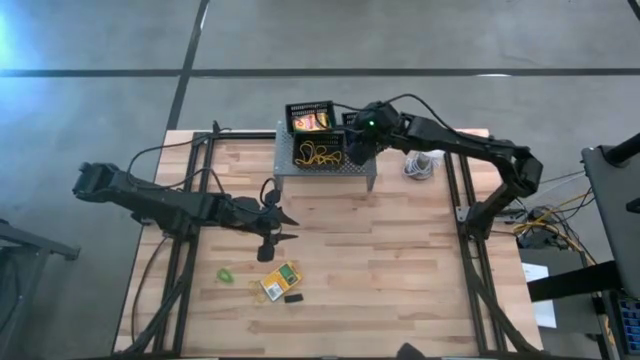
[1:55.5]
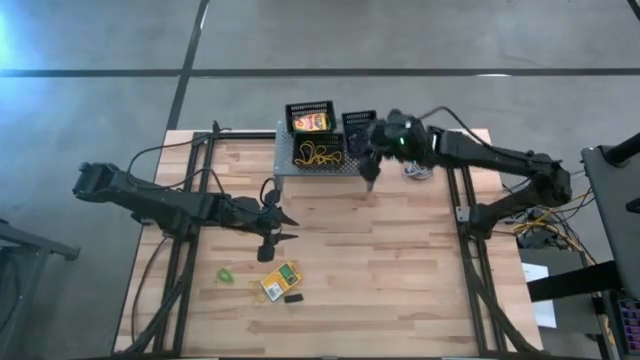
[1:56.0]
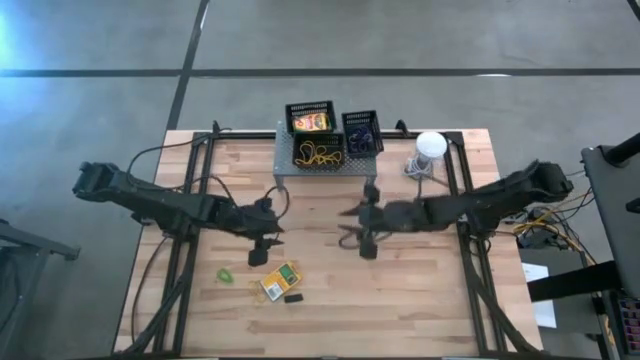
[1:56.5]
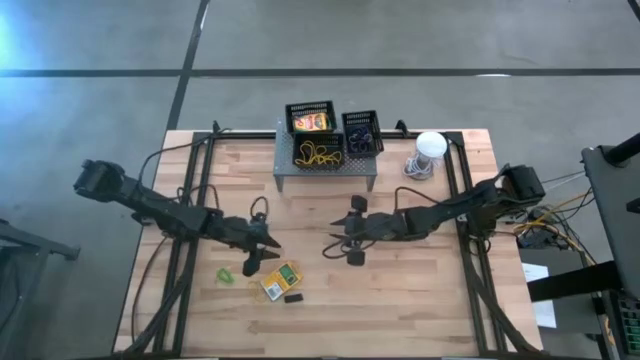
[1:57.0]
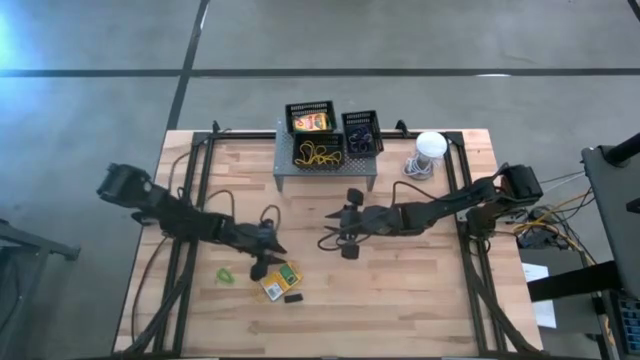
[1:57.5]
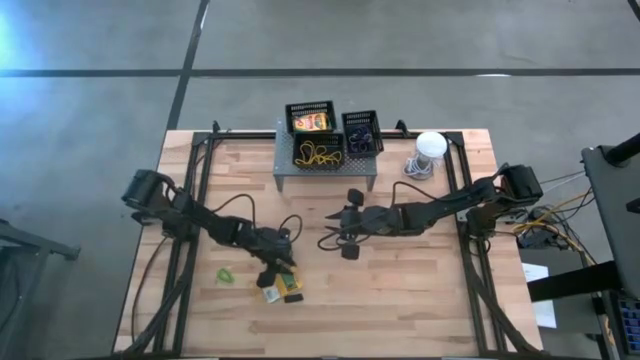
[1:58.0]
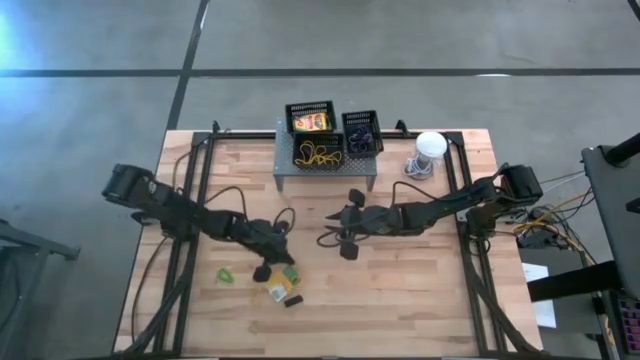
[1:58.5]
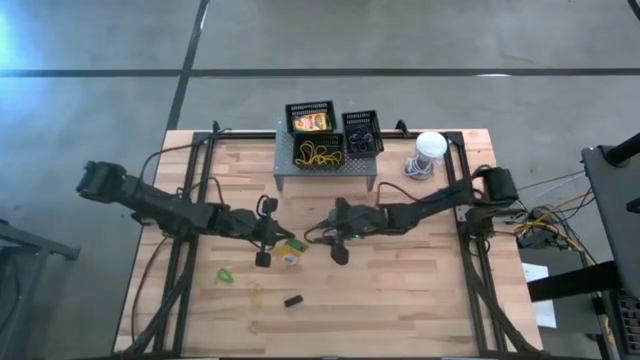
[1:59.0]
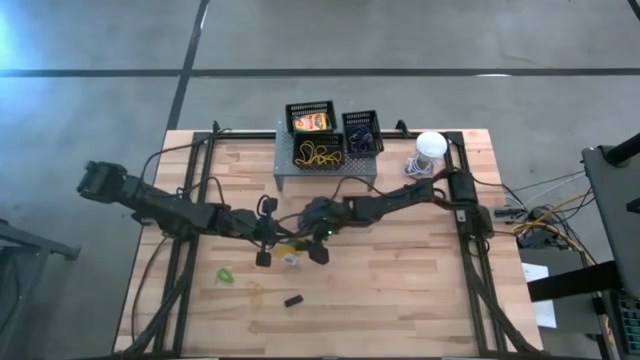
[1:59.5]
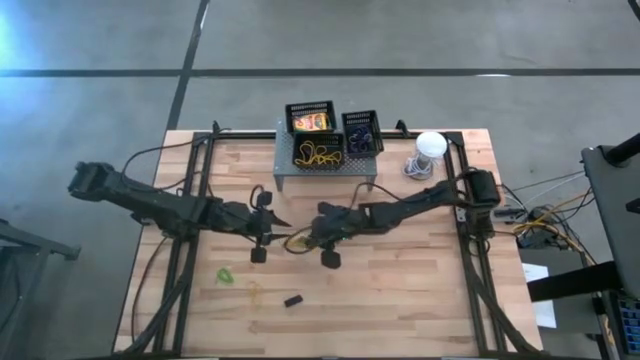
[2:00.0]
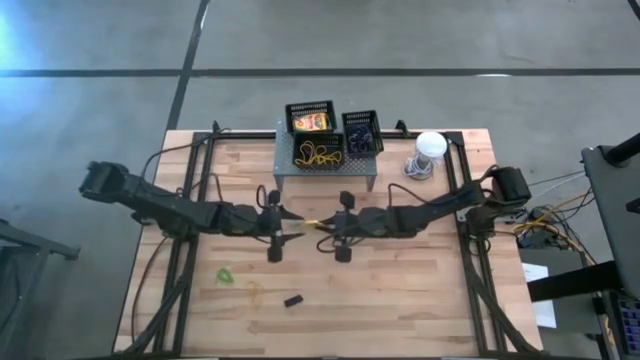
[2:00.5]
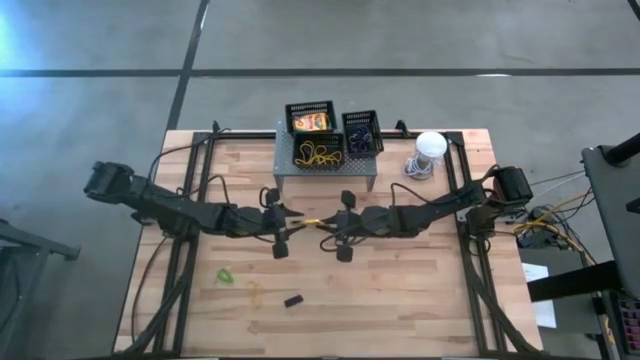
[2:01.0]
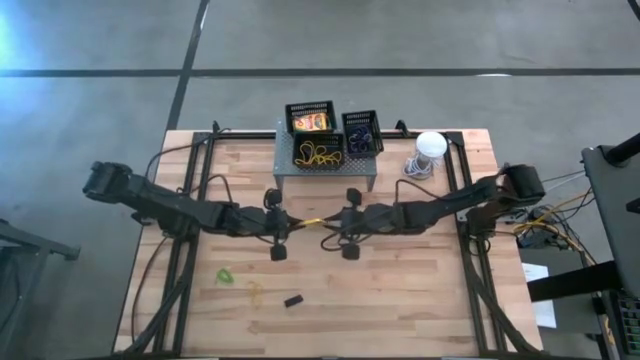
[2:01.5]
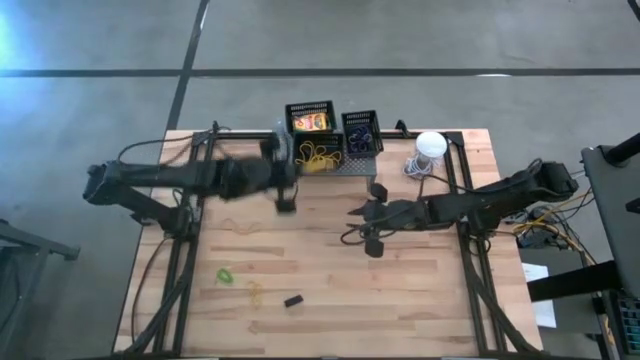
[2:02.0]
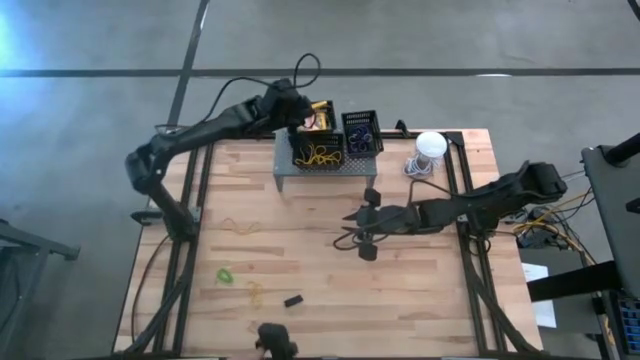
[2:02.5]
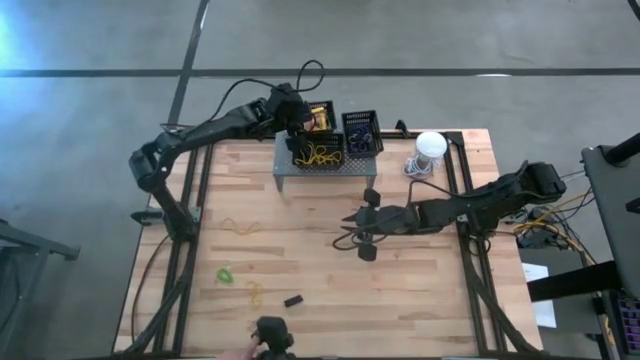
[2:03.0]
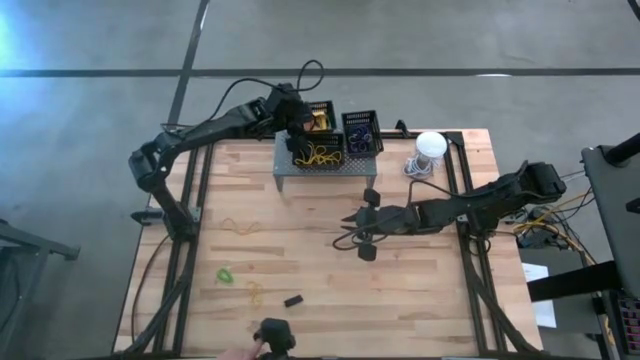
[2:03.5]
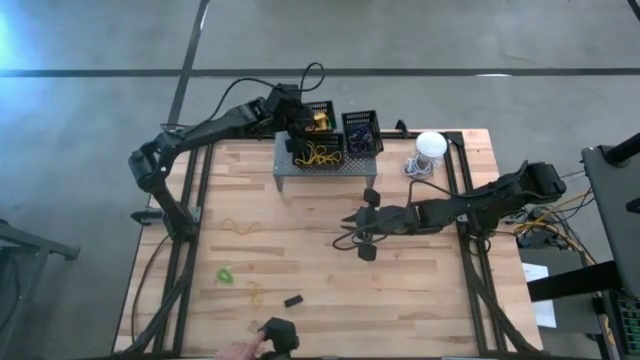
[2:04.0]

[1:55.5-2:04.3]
Task: Pick & Place Office Desk Supplies
Put the crayon box in the top left black bin

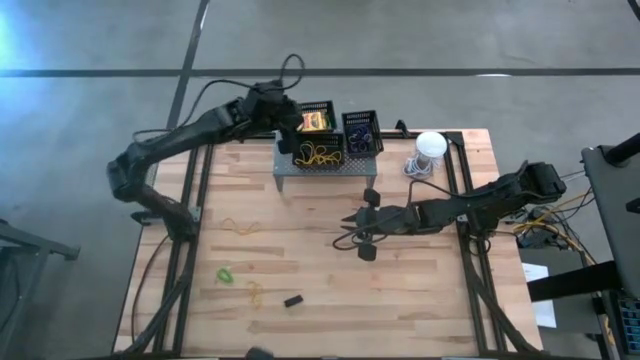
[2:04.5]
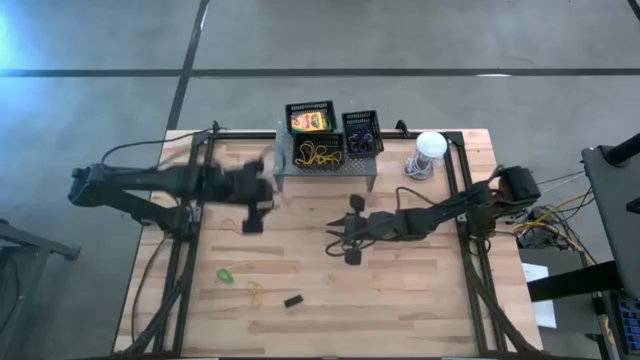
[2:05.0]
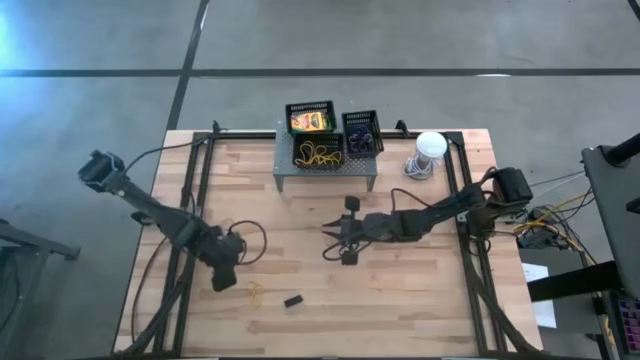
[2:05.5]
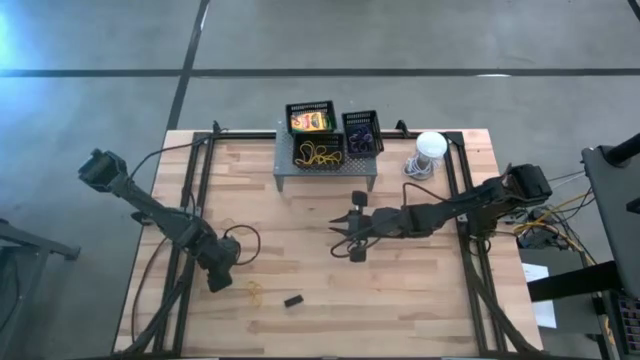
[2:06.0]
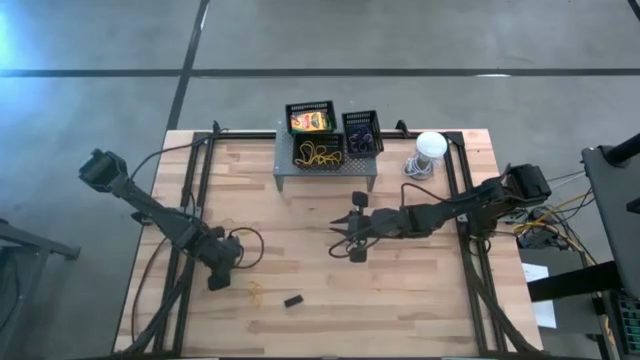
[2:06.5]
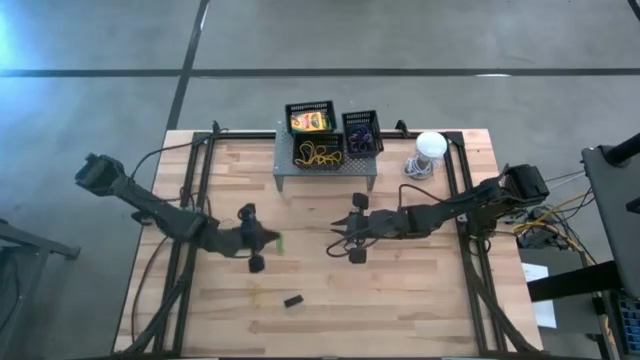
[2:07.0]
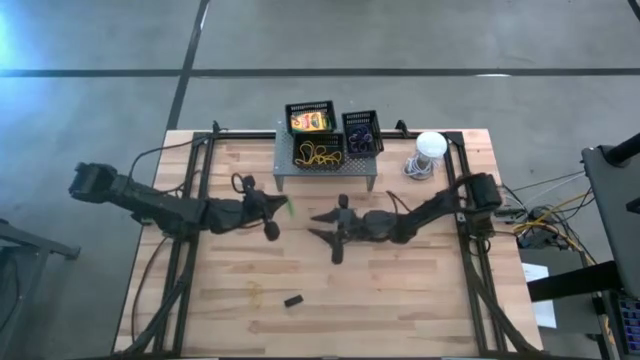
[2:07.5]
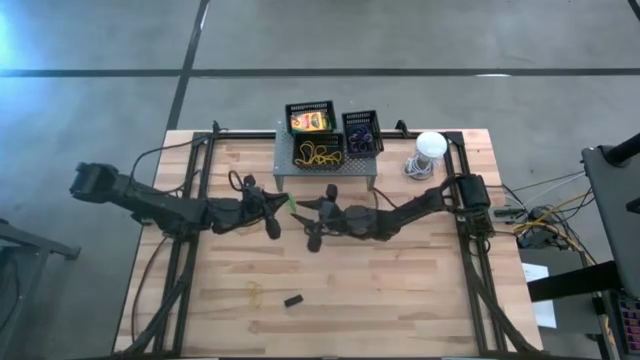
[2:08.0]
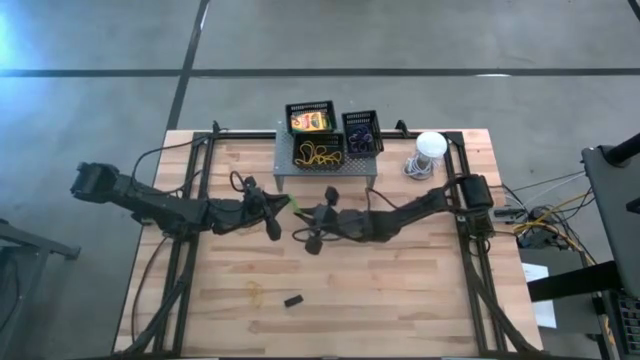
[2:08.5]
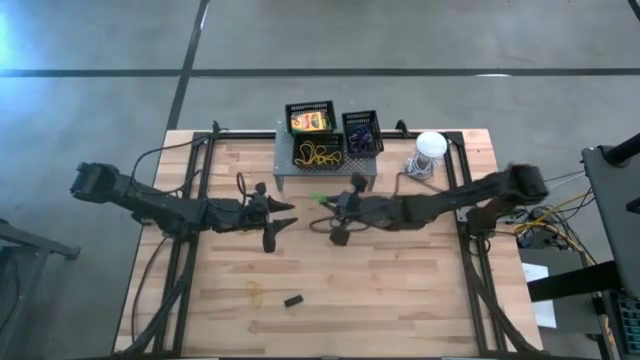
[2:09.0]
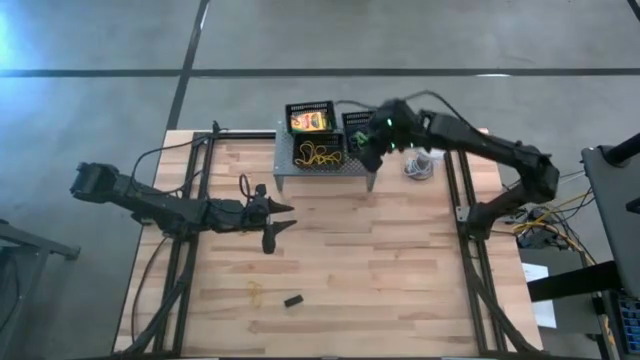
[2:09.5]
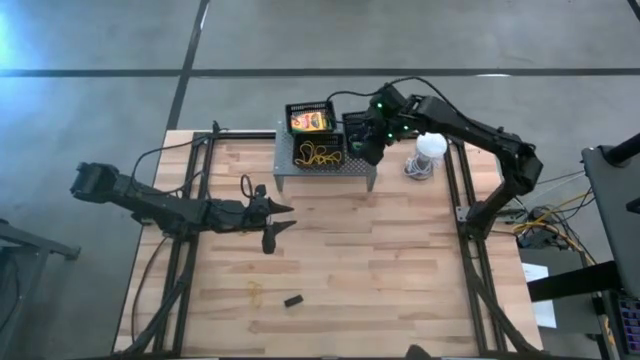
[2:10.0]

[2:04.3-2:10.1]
Put the green spring keychain into the right black bin

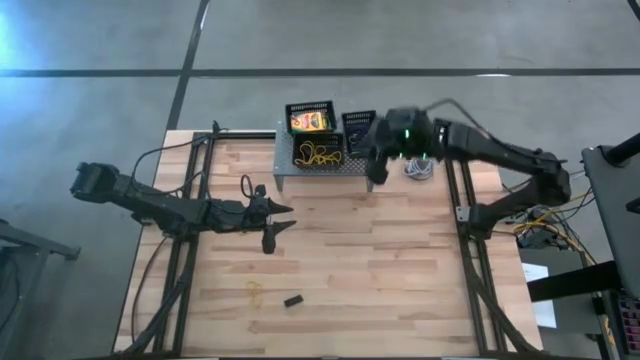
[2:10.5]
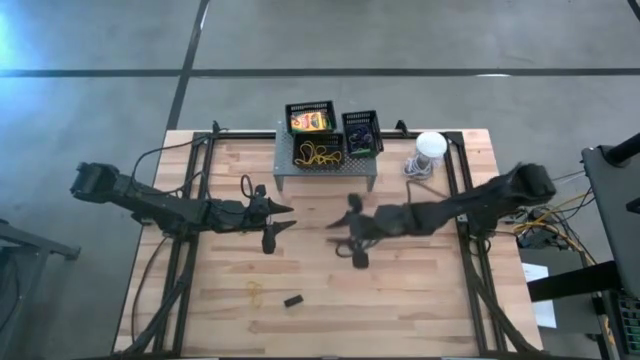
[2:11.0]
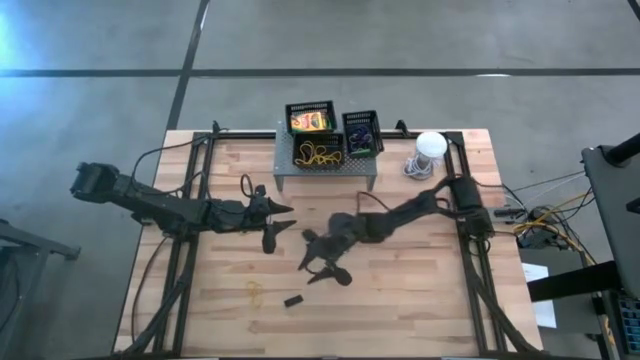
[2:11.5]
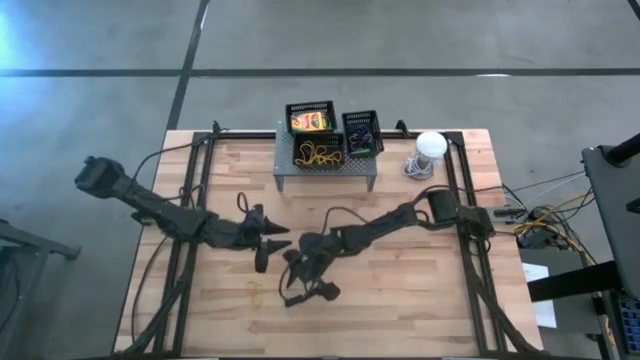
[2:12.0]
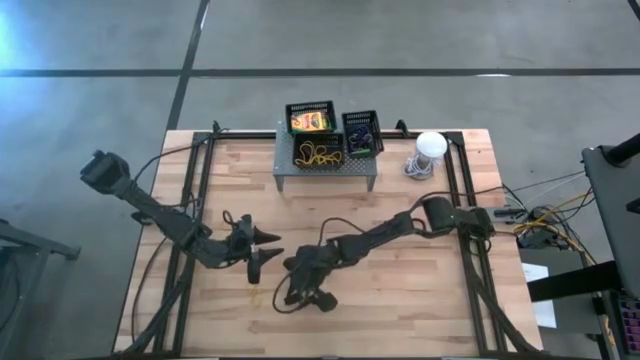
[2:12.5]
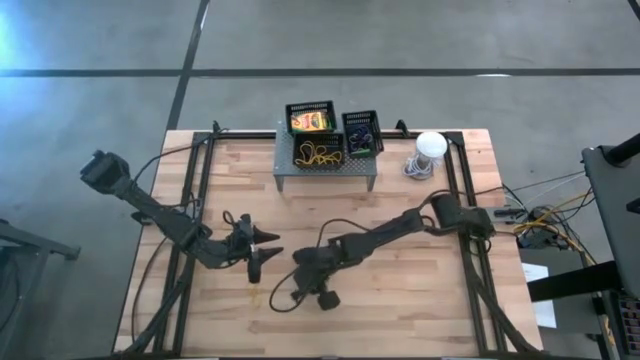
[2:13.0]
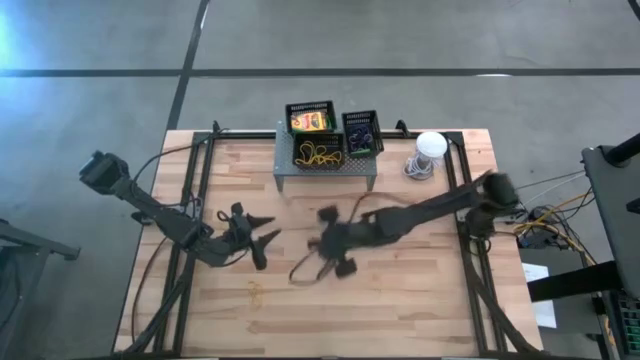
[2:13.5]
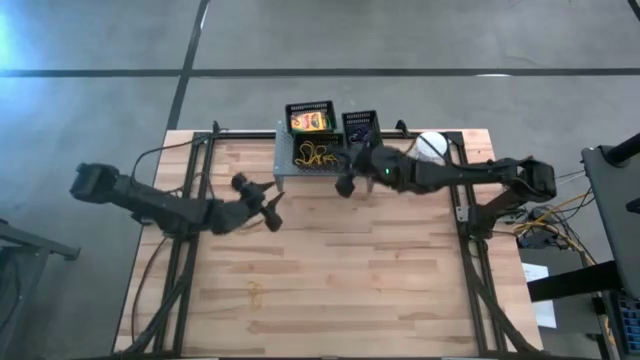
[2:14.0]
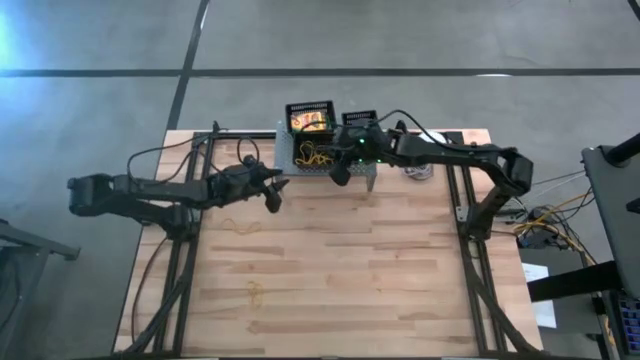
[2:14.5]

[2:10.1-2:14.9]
Put the black rubber band into the bottom left black bin

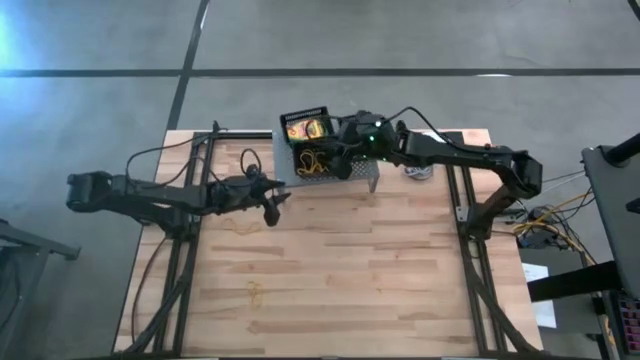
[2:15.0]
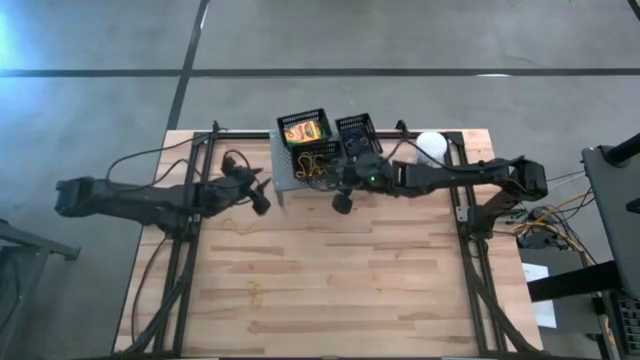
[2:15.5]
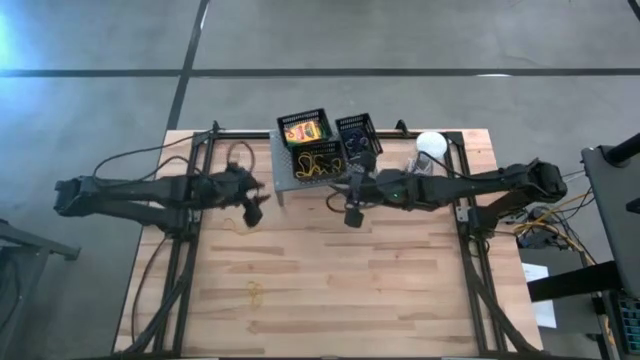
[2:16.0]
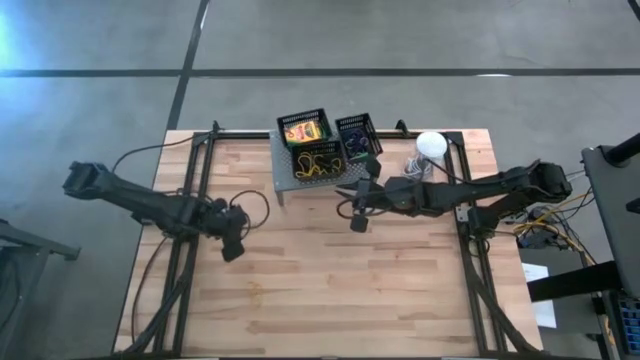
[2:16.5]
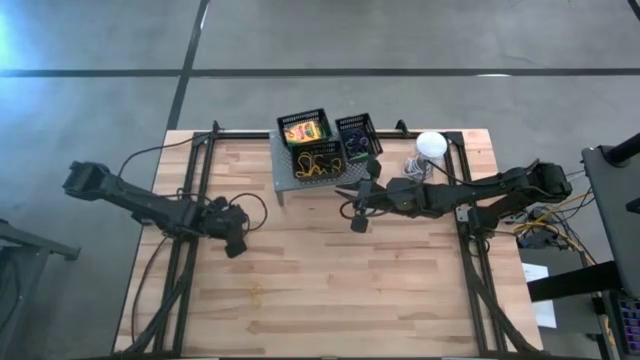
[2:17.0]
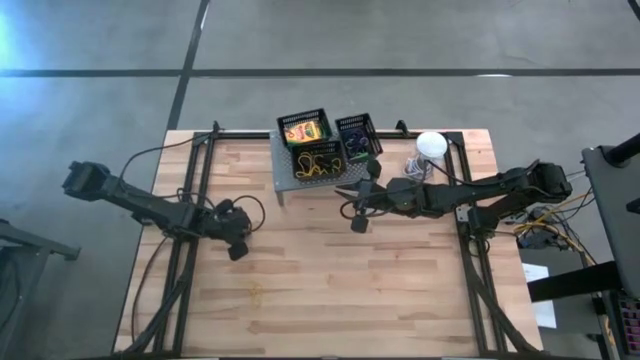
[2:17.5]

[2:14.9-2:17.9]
Put the yellow rubber band into the bottom left black bin
